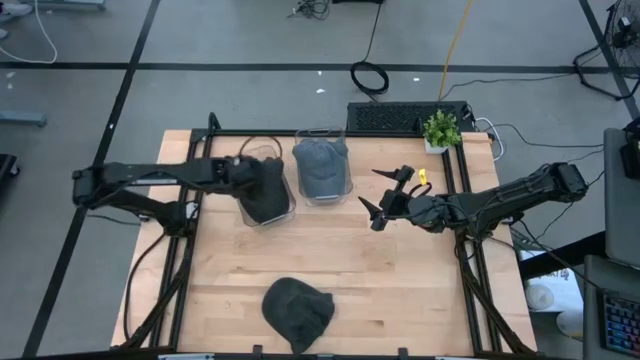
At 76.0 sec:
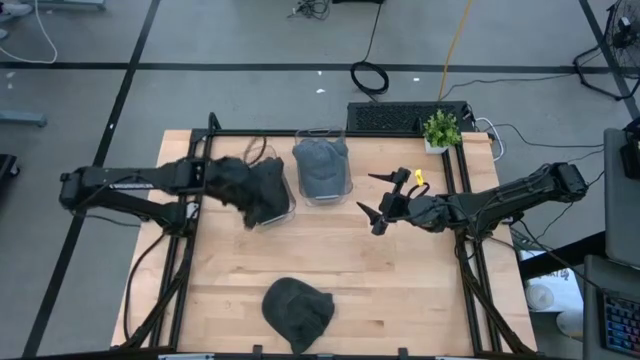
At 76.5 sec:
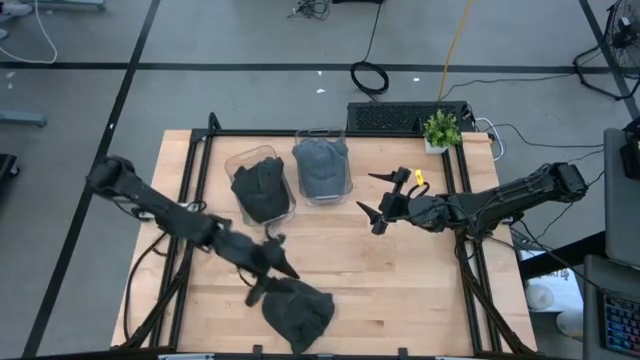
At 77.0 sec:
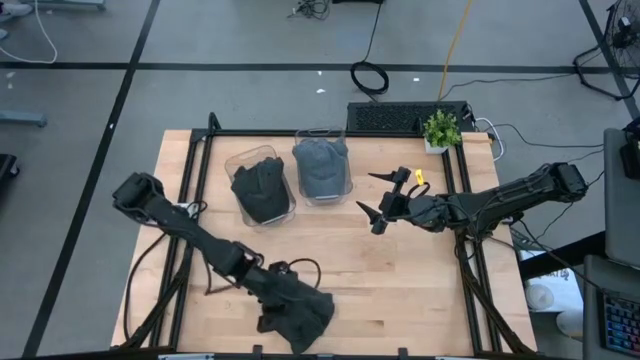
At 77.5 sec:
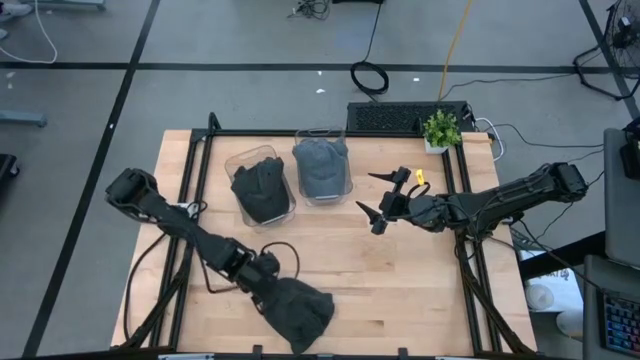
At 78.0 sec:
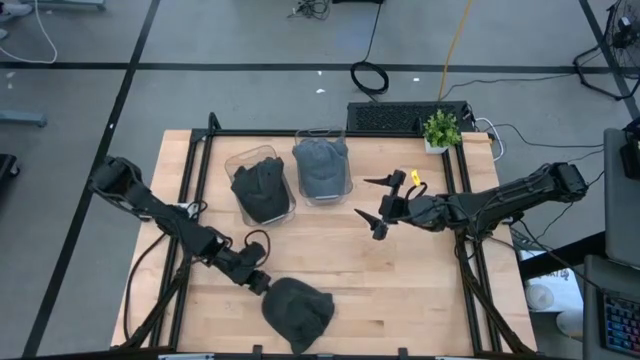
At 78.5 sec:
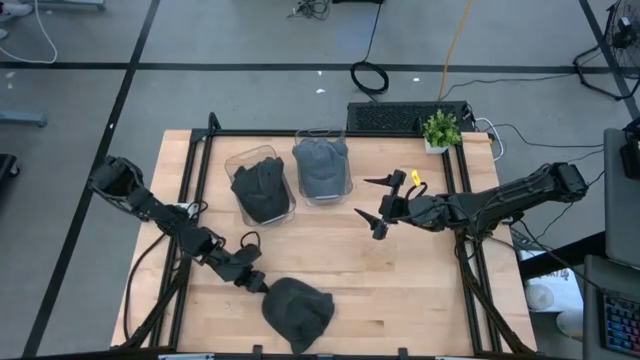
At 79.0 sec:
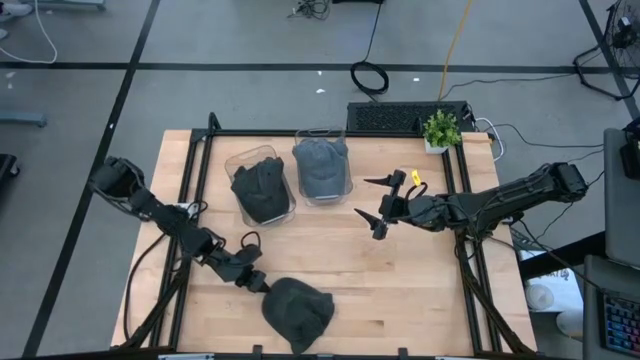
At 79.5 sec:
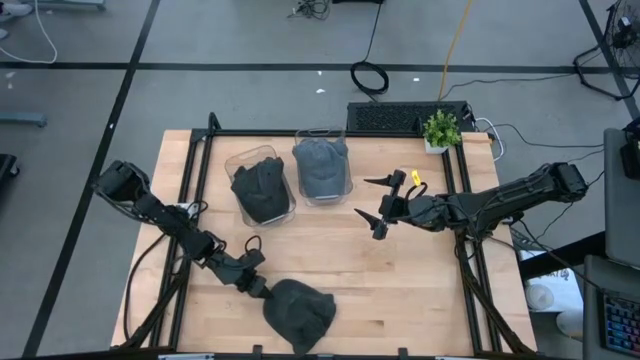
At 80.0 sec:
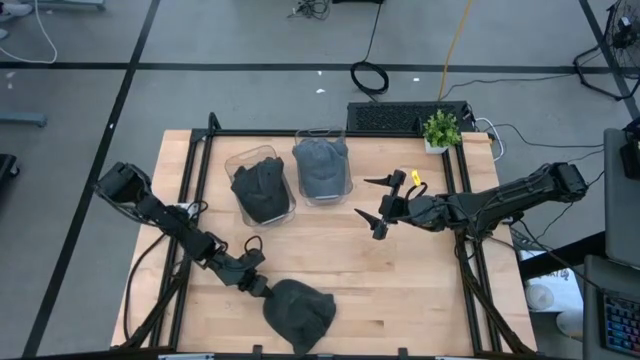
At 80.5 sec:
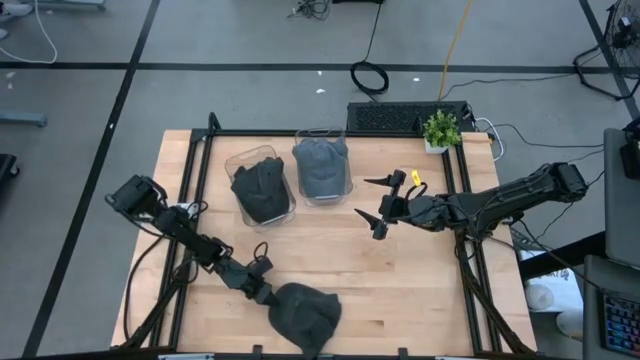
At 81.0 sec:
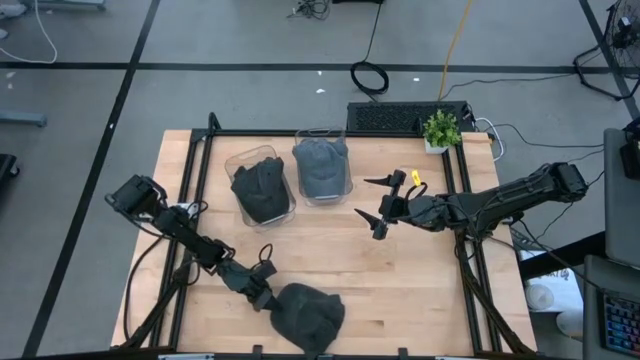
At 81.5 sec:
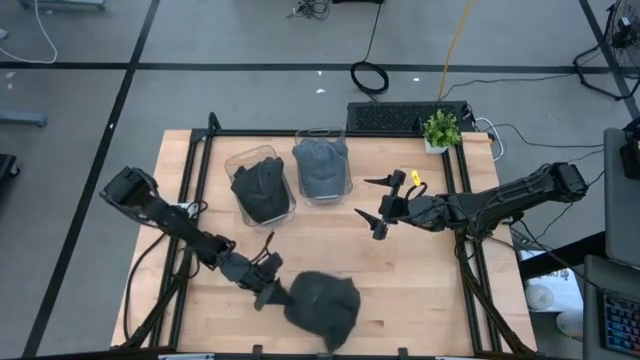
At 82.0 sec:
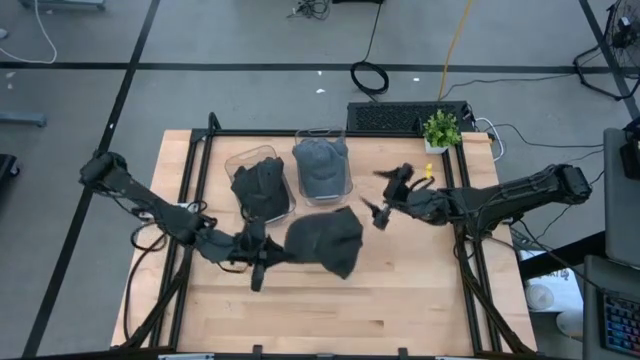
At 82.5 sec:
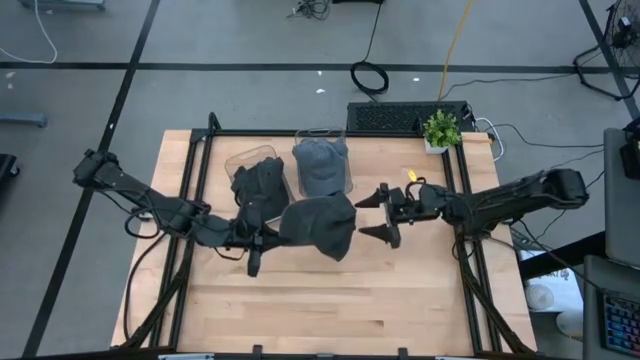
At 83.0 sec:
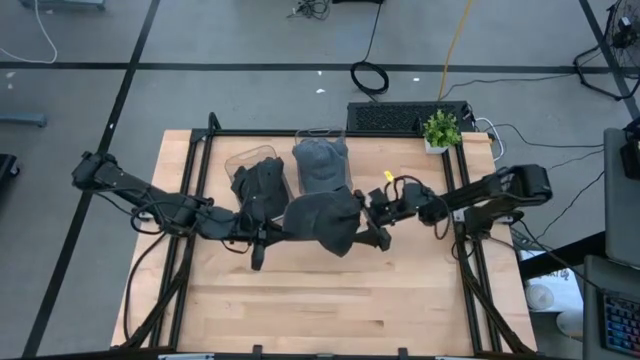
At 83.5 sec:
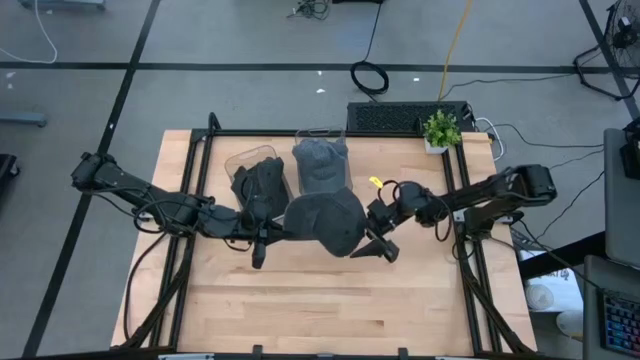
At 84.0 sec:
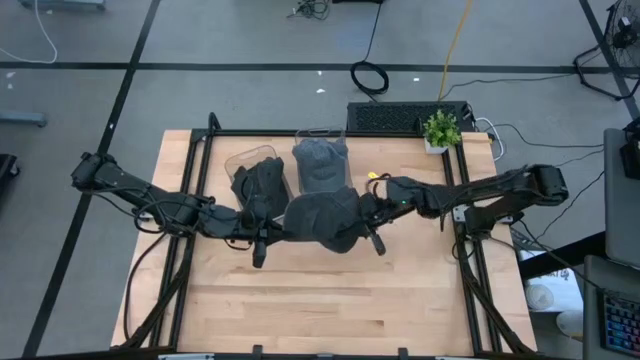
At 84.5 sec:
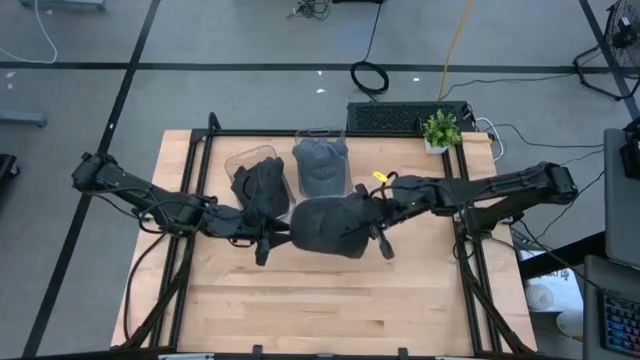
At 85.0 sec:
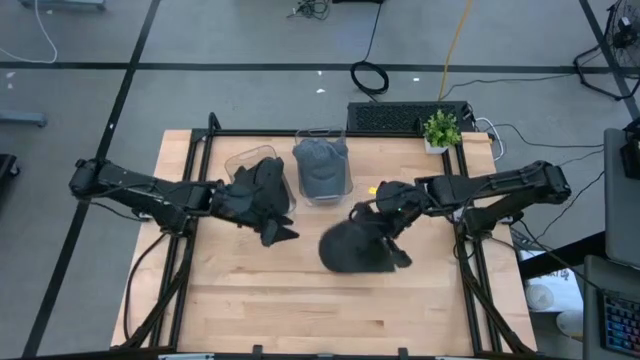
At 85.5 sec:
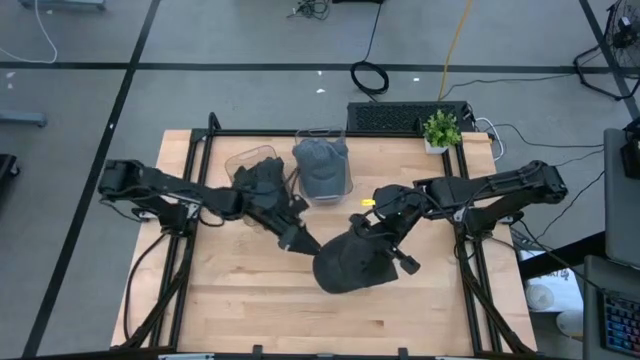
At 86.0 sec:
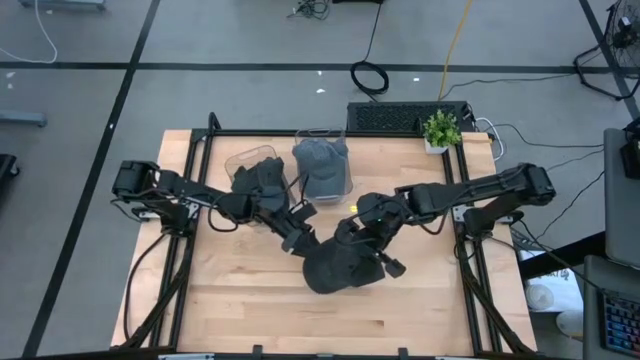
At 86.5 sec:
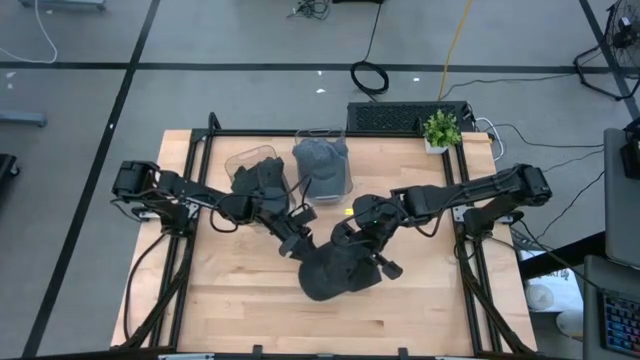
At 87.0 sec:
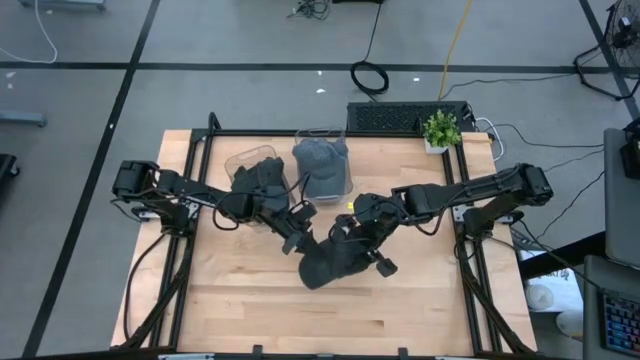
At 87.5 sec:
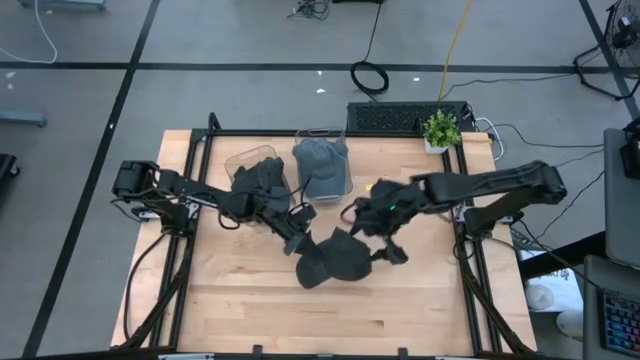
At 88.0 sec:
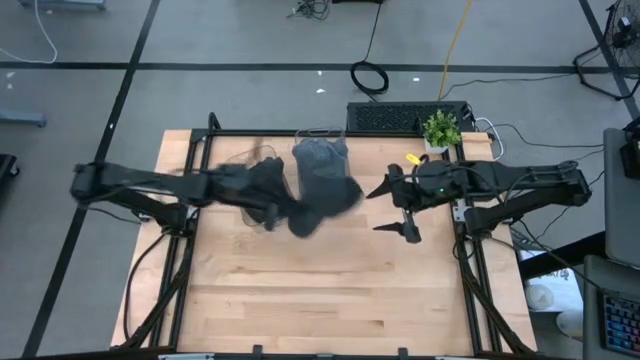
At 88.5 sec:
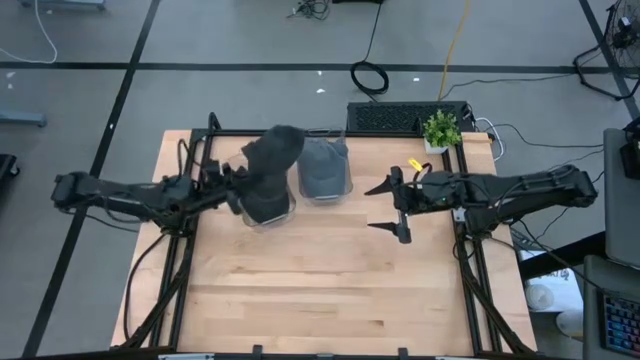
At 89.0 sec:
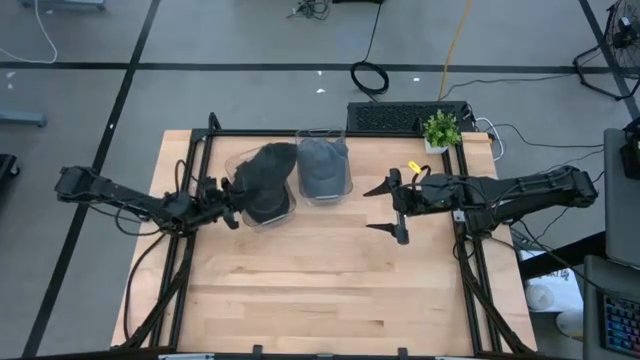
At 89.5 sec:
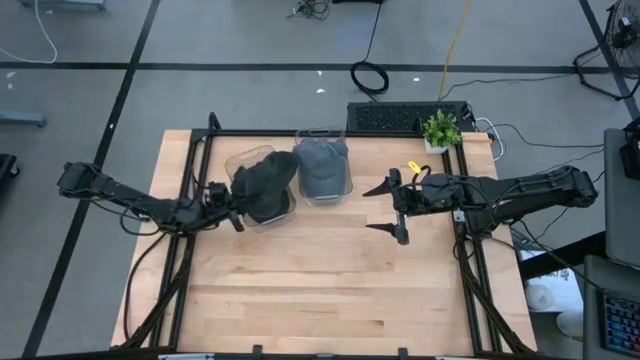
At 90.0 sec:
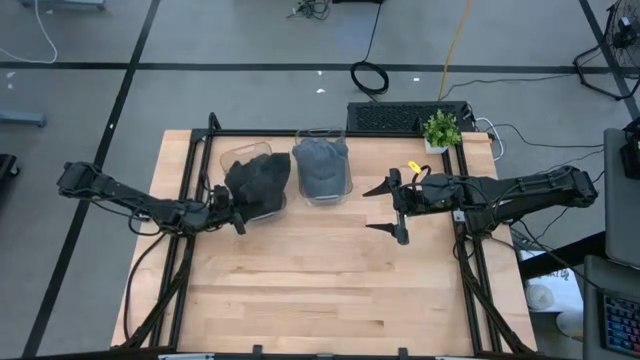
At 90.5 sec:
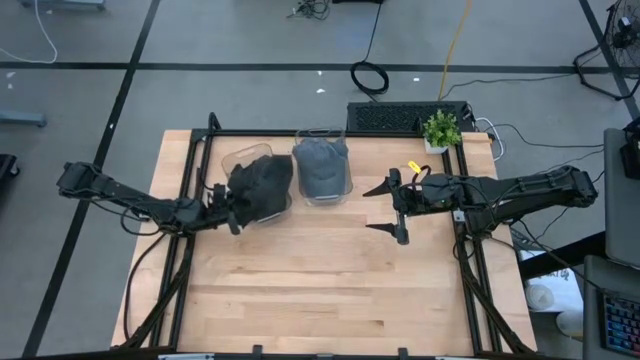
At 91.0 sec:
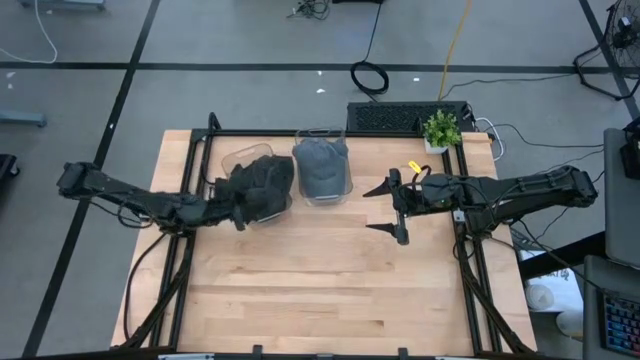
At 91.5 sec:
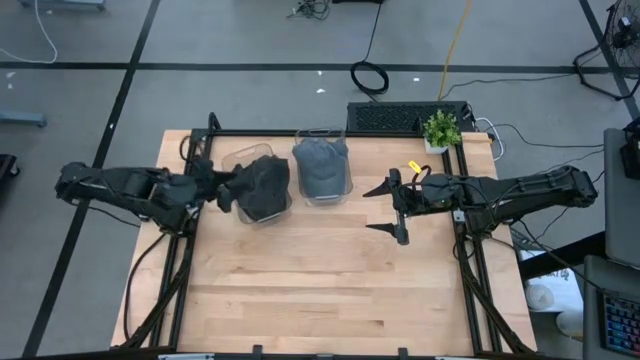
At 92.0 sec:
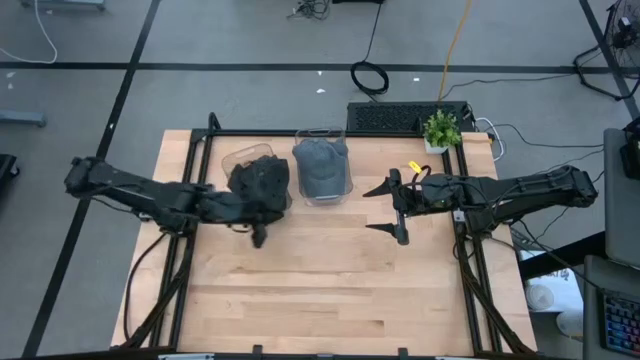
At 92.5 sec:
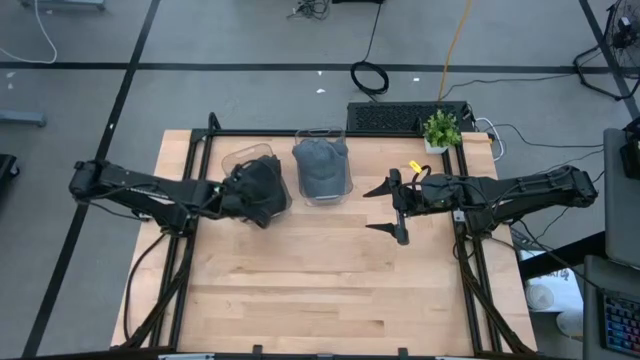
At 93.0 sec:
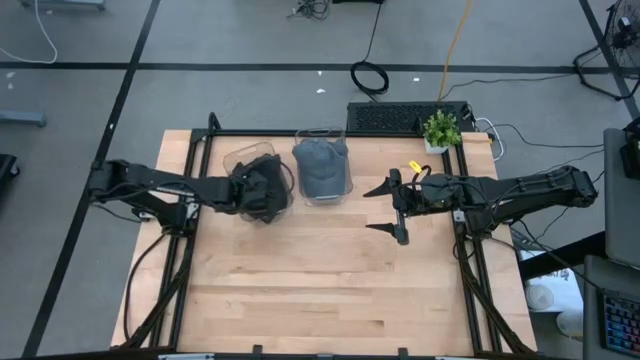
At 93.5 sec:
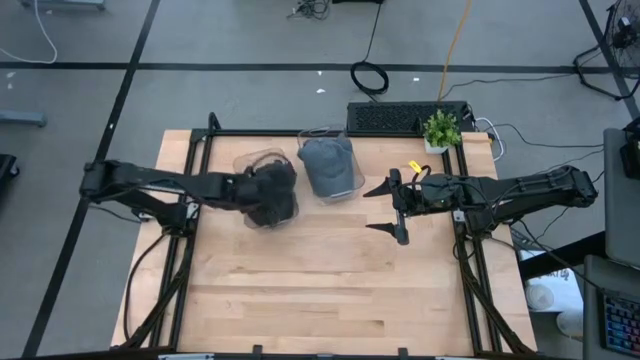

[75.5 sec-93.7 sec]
Task: Pick & Place hat
Put the black cap into the left transparent bin

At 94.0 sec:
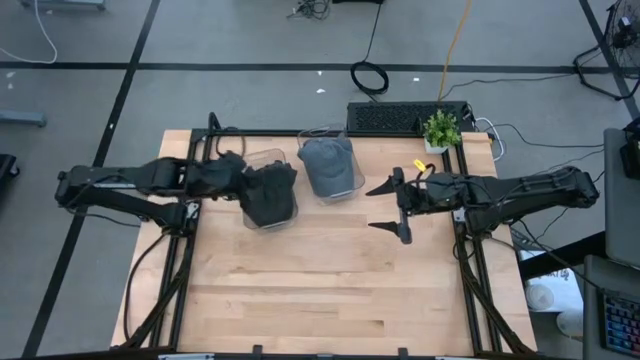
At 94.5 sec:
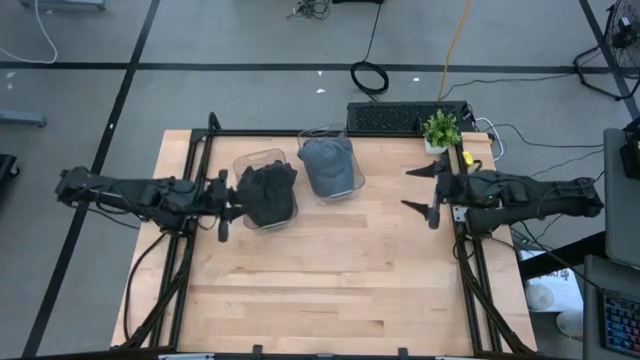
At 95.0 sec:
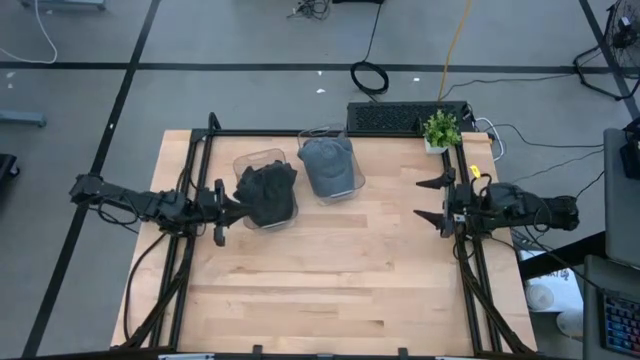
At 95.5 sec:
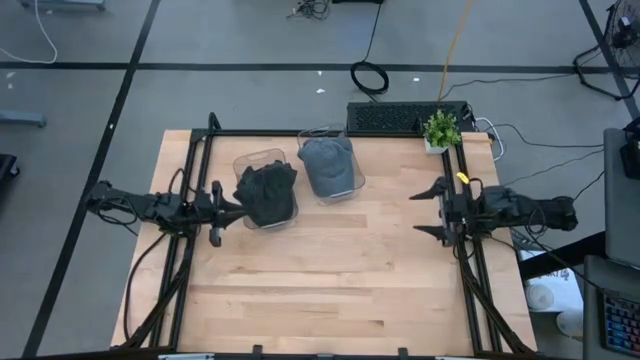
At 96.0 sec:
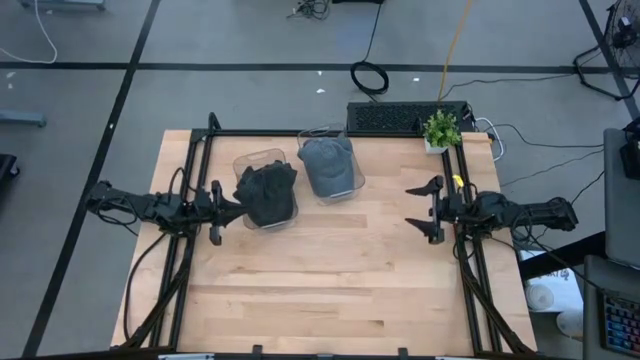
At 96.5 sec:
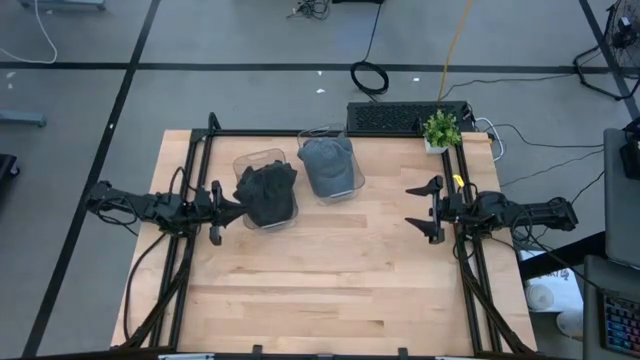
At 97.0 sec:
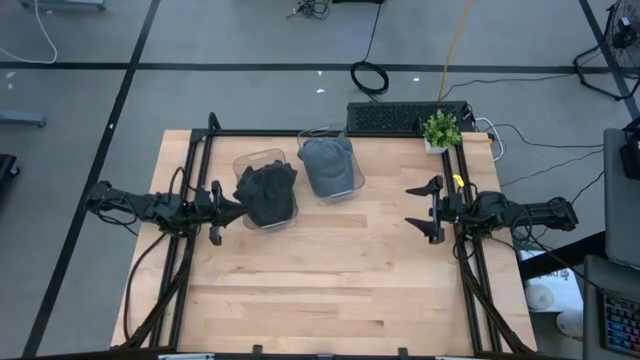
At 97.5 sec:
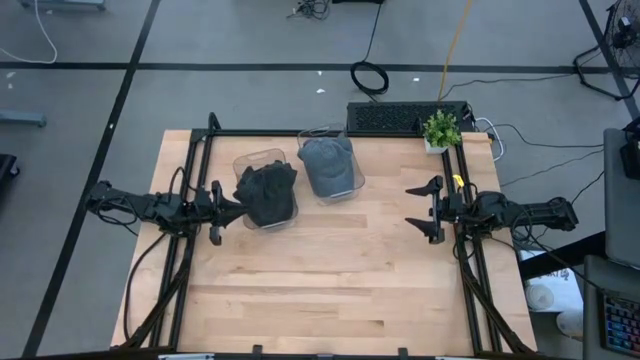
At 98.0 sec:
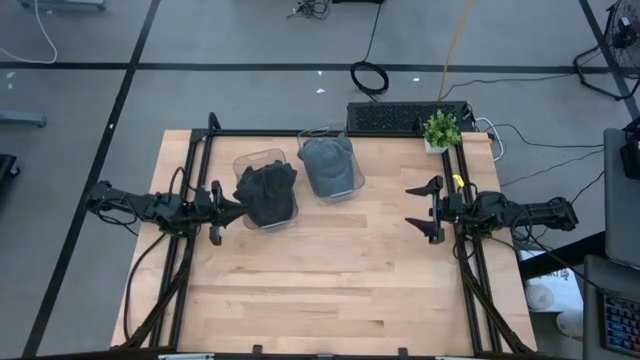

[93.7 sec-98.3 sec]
Return to Home Position
